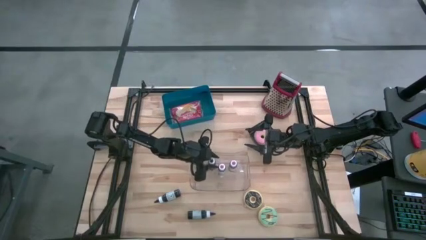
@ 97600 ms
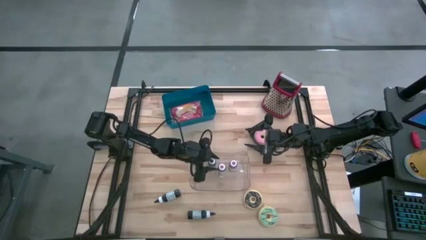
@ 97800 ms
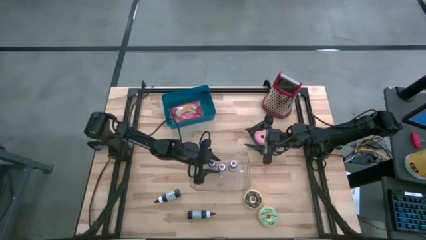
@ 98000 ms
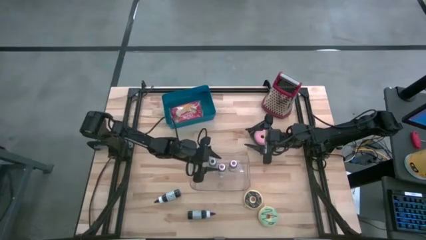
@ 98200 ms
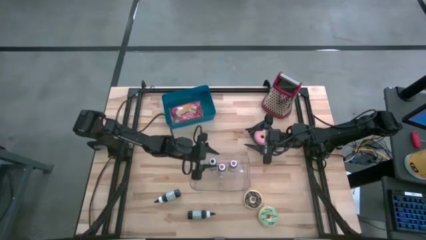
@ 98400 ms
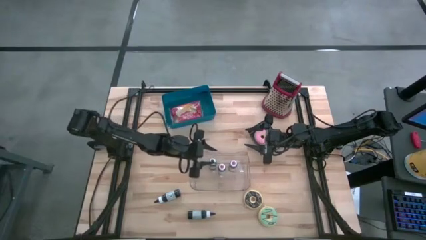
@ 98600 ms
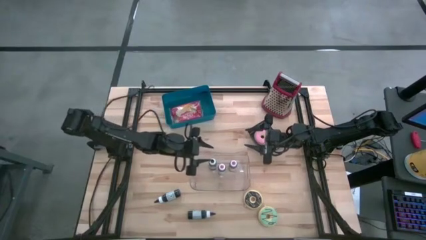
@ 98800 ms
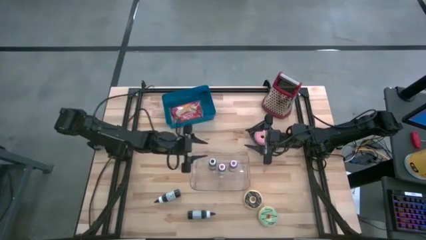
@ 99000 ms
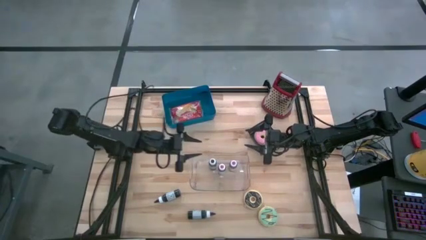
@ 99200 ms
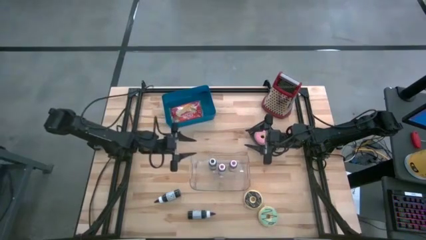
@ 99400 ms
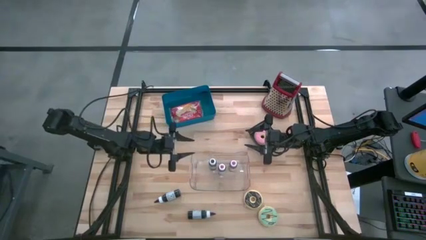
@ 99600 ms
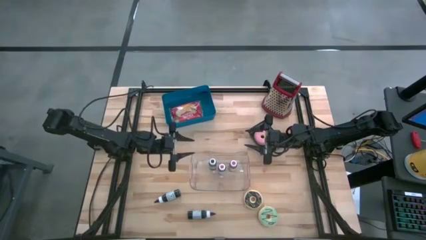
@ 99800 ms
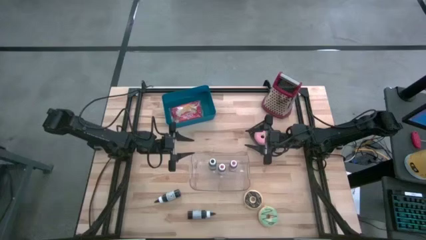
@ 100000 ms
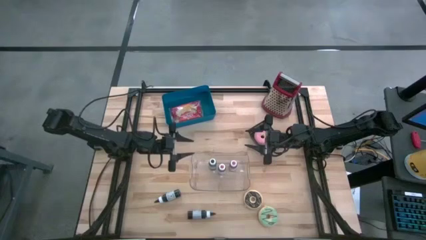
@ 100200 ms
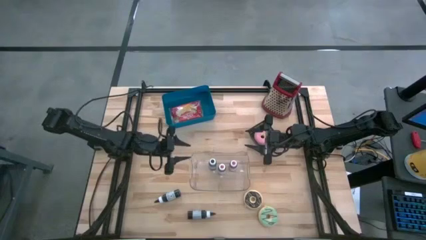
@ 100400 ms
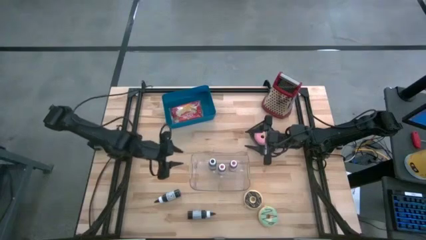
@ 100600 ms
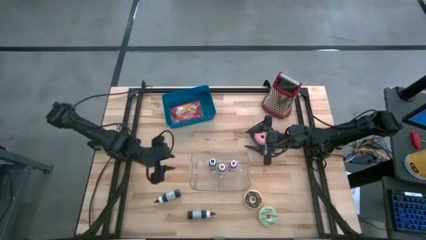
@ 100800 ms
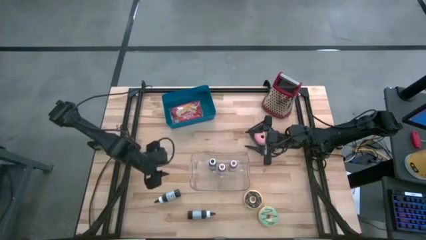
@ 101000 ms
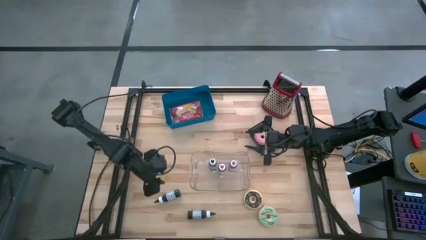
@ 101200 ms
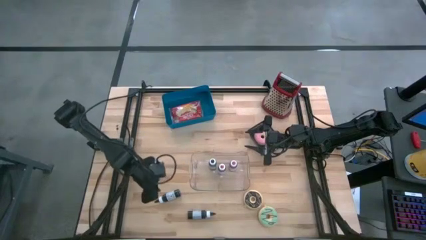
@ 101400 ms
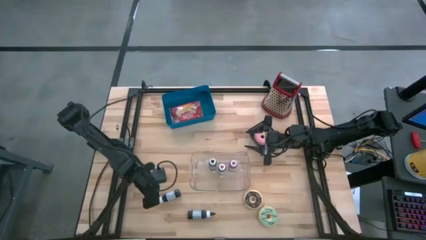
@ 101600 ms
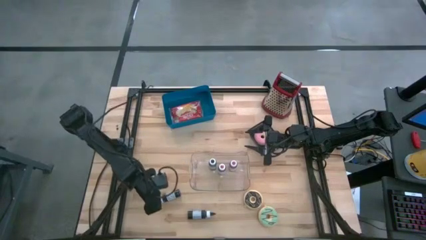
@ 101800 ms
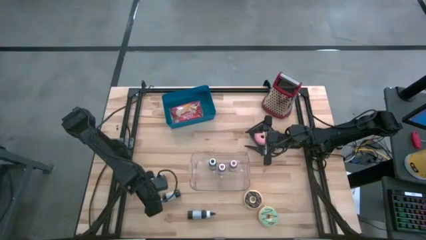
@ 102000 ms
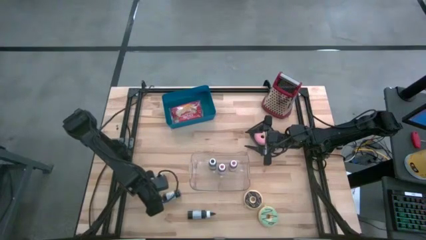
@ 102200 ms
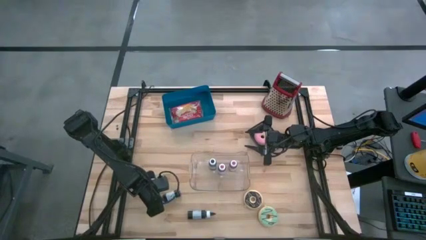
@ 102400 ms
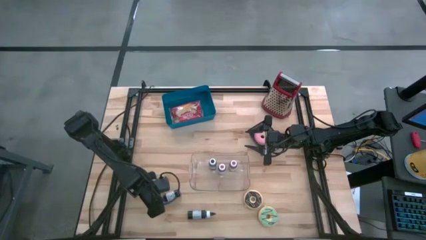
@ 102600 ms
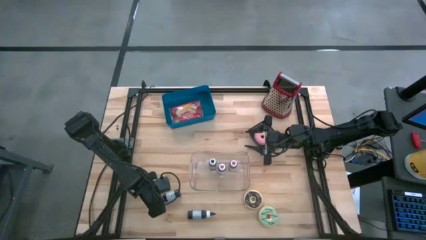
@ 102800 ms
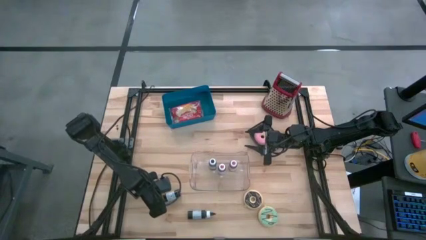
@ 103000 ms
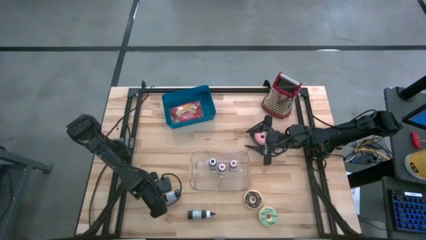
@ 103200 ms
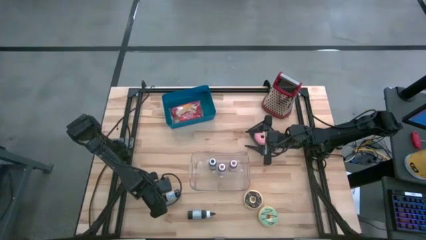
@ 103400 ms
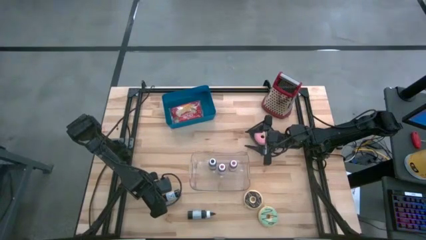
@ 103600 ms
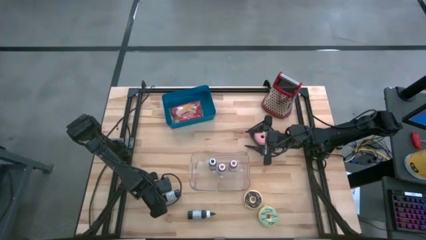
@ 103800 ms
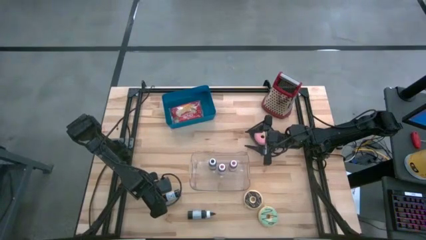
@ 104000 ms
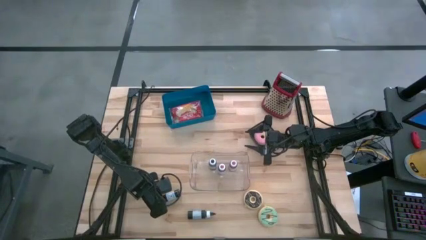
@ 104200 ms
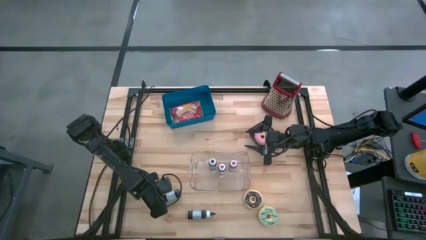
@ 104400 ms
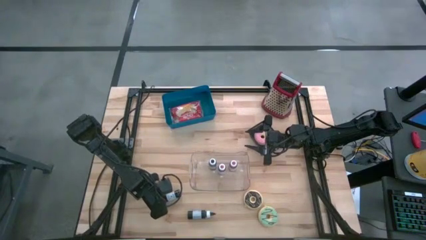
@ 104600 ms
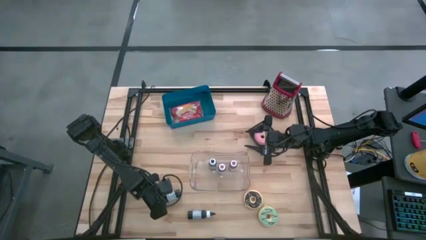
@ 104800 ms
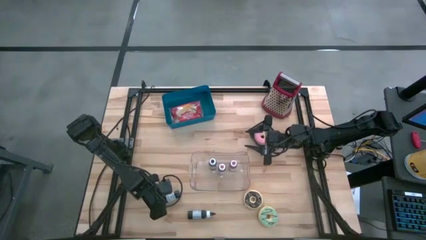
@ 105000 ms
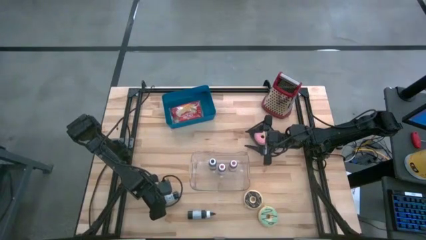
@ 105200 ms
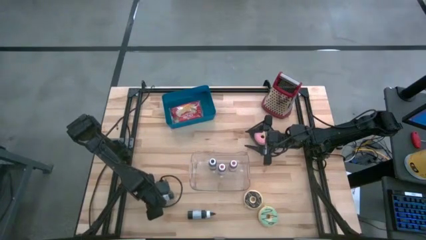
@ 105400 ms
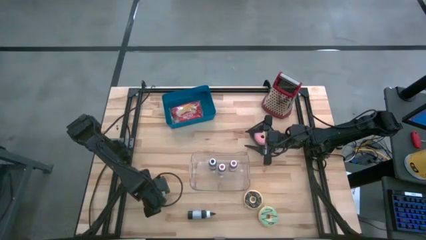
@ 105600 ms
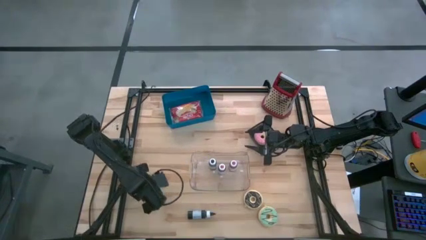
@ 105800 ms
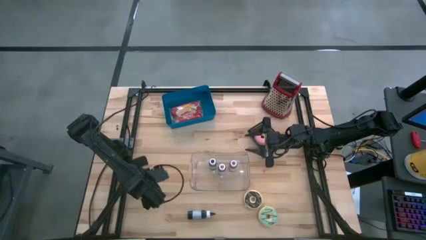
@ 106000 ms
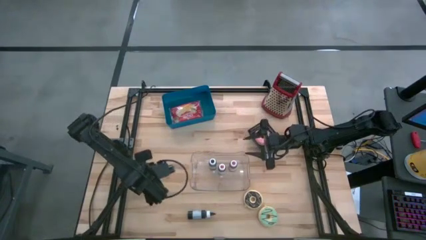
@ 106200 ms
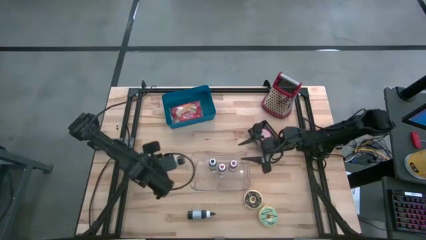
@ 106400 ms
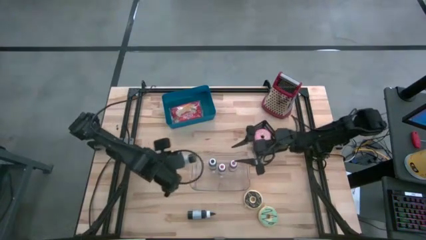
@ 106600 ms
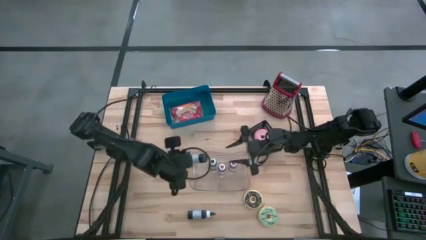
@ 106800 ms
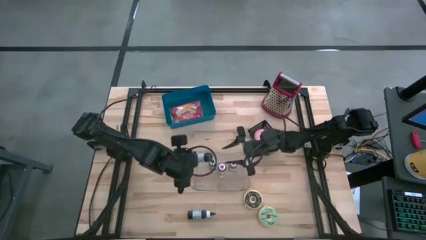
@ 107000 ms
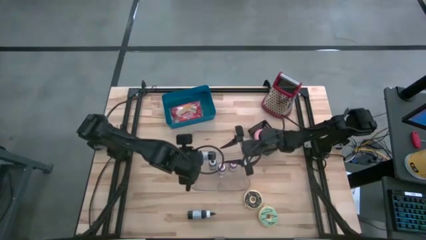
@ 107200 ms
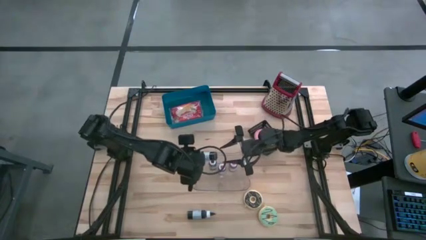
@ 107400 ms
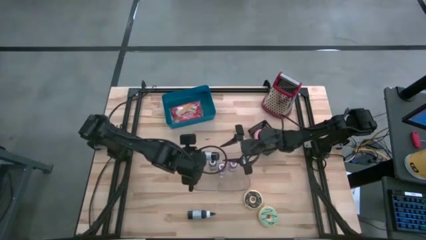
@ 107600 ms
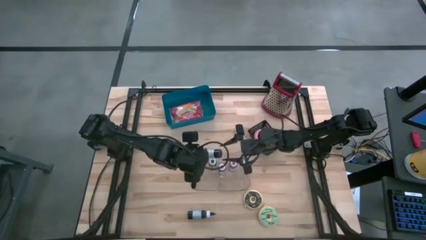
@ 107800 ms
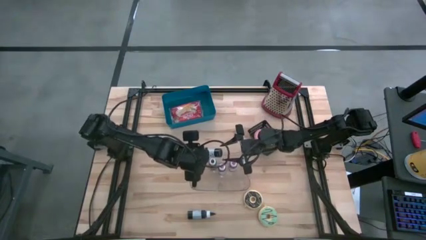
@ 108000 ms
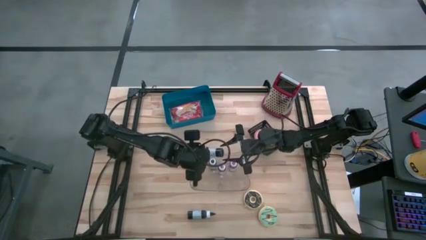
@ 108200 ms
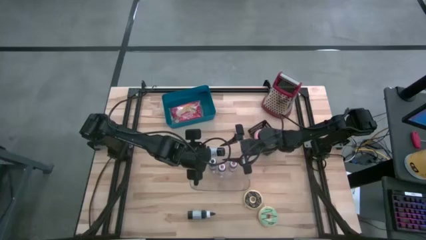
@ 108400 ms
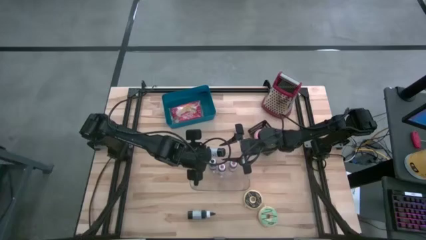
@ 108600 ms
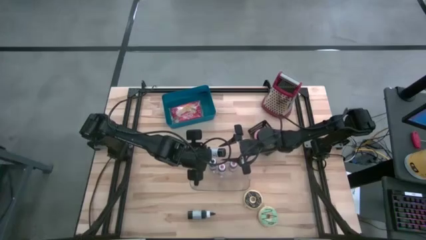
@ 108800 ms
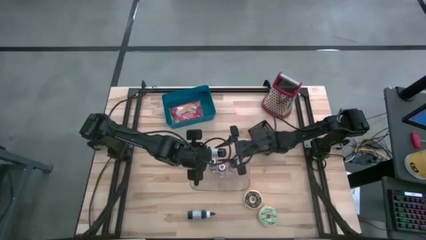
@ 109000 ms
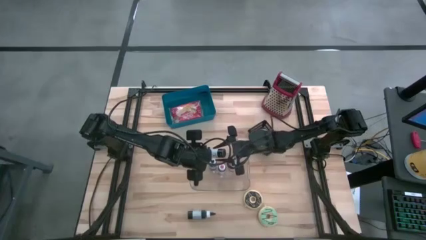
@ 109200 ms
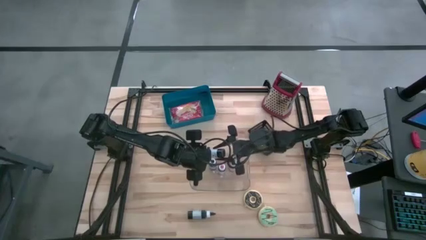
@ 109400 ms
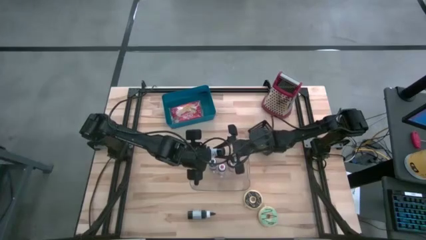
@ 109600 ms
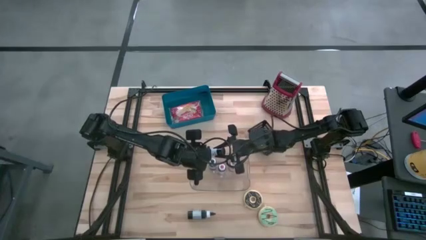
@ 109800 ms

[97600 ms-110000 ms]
Put the top black food coloring bottle into the transparent bin
